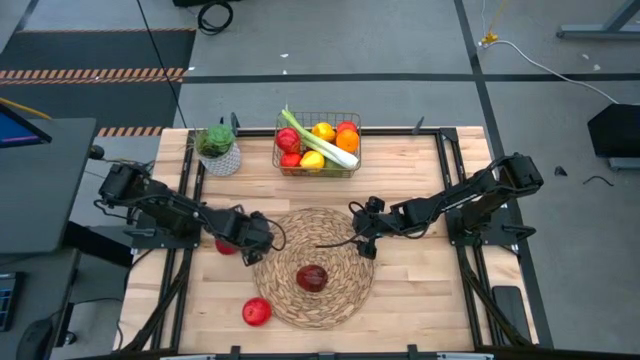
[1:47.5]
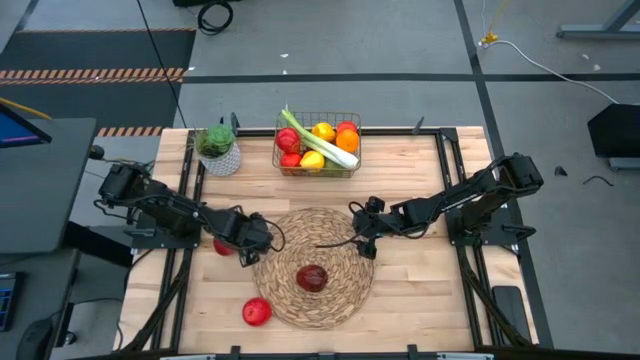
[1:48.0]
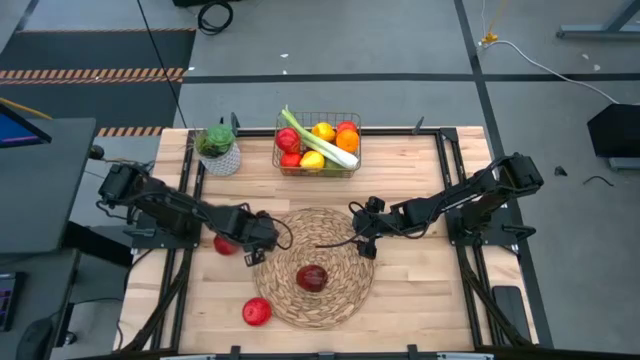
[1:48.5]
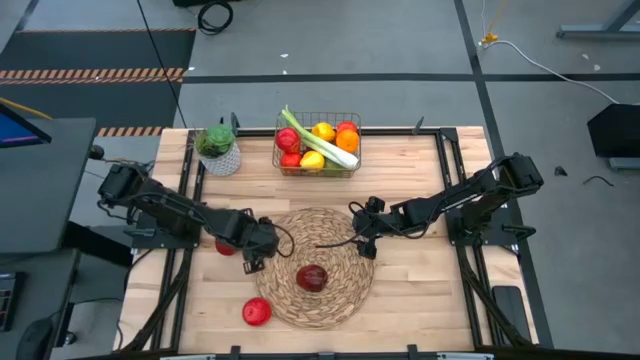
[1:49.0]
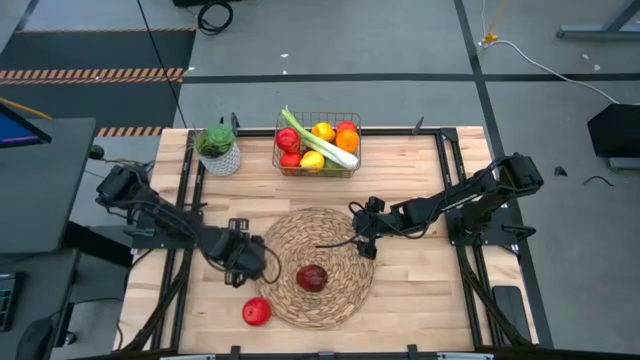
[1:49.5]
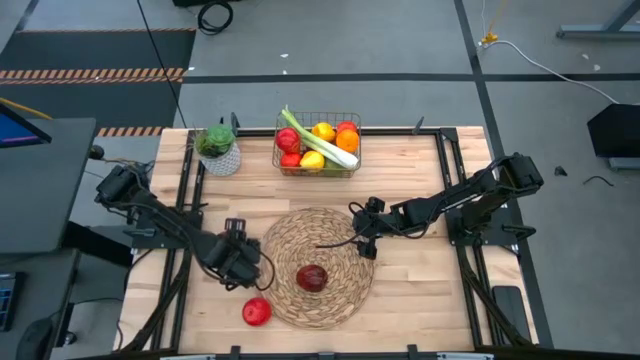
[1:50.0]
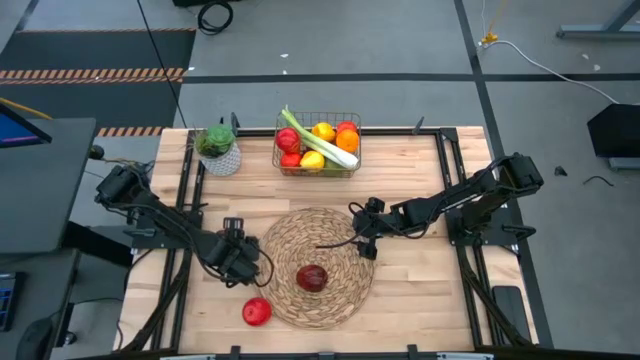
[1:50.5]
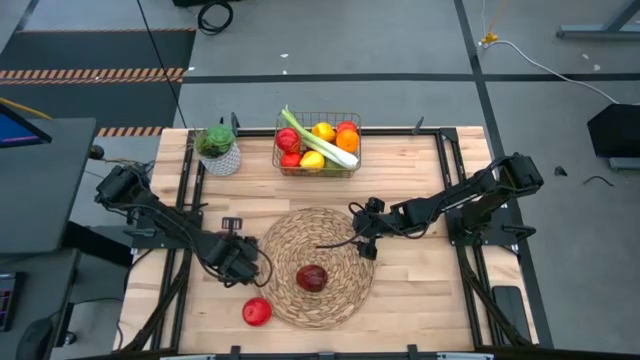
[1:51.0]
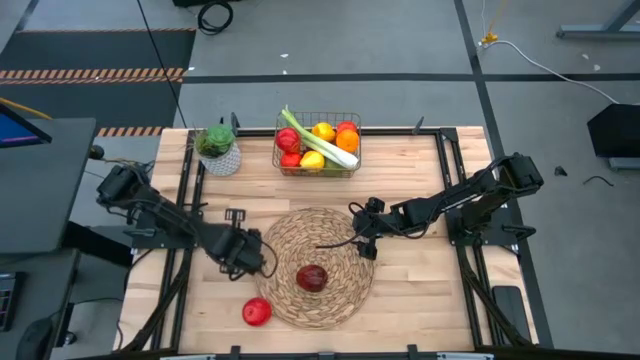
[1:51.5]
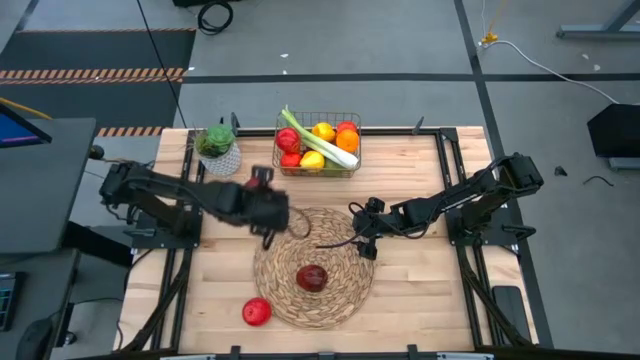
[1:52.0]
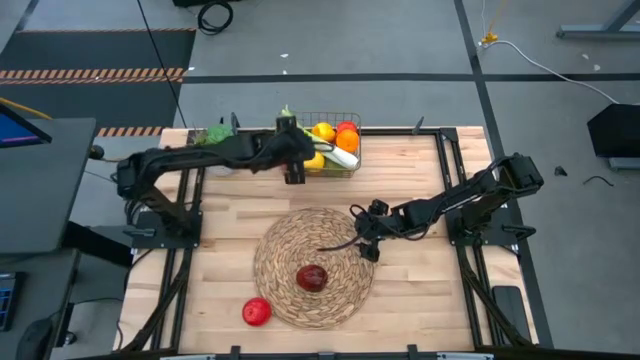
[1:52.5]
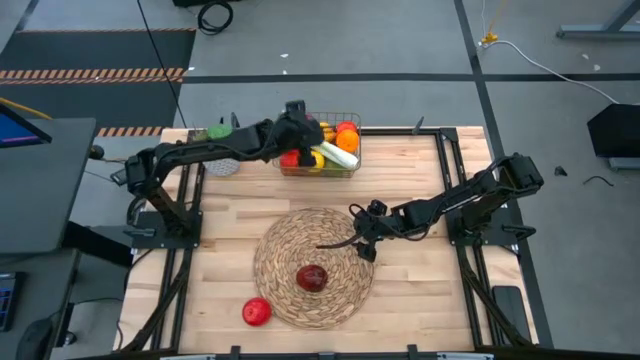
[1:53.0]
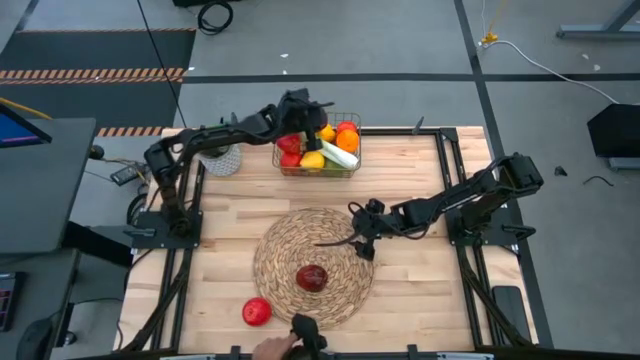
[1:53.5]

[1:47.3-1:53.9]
Task: Build produce basket
Put the pomegranate into the wire basket

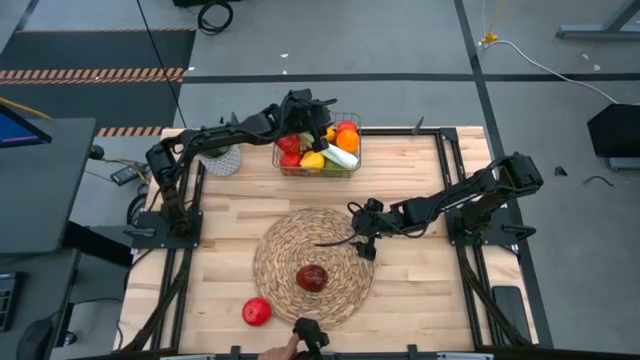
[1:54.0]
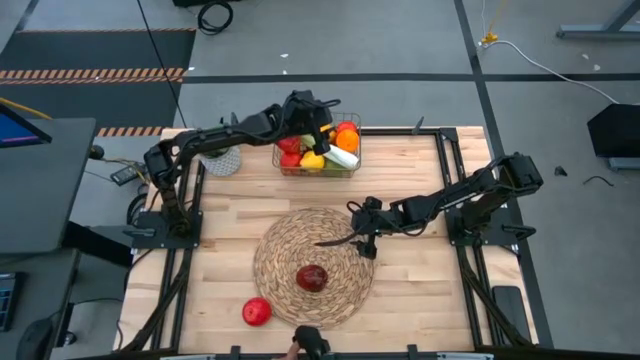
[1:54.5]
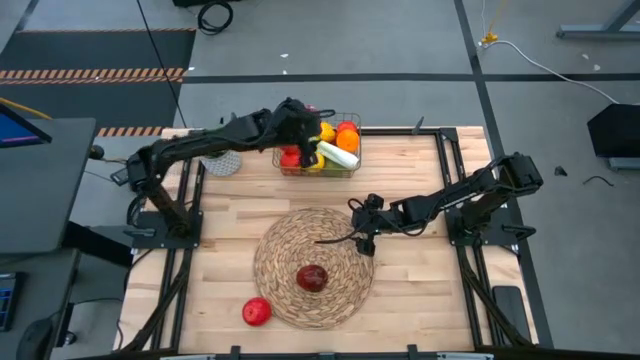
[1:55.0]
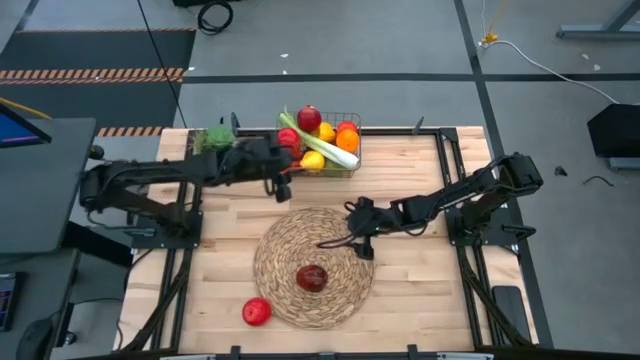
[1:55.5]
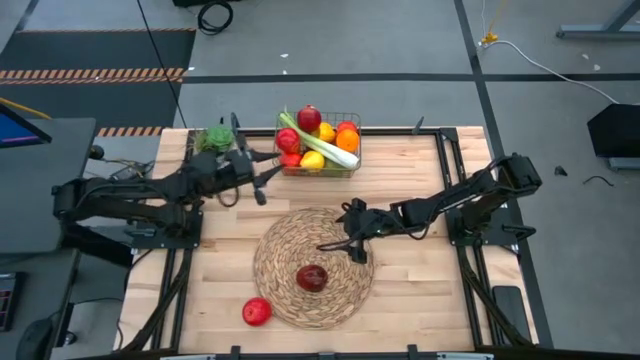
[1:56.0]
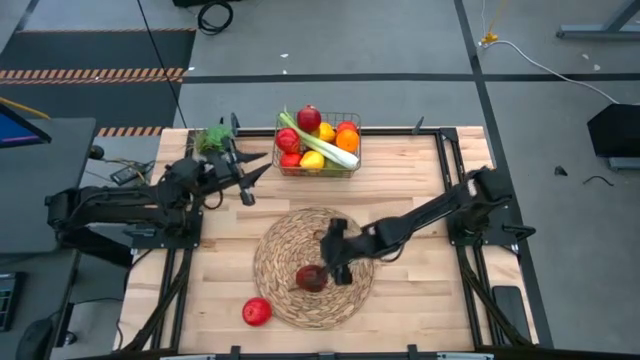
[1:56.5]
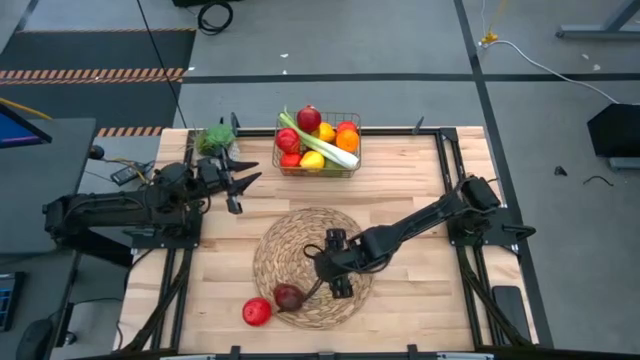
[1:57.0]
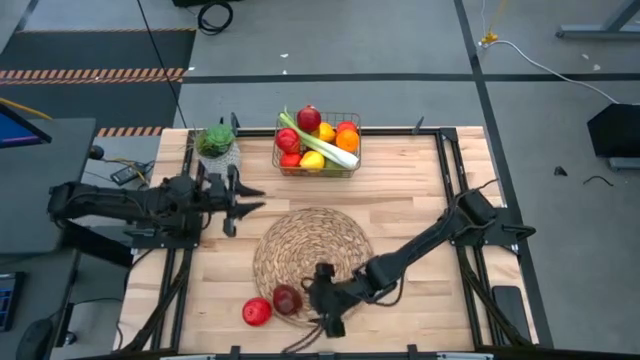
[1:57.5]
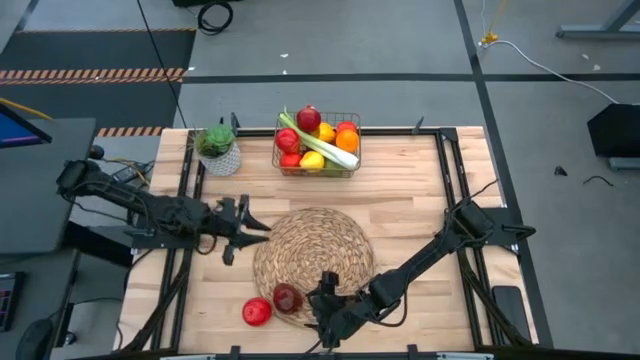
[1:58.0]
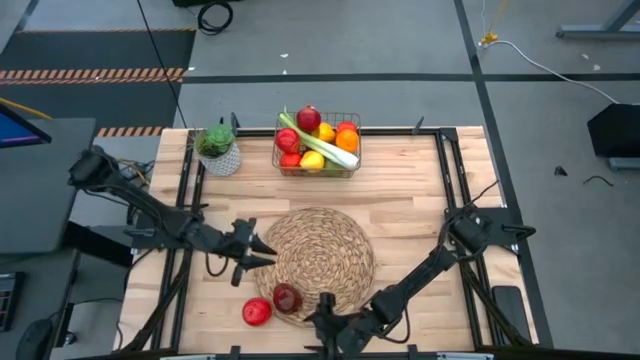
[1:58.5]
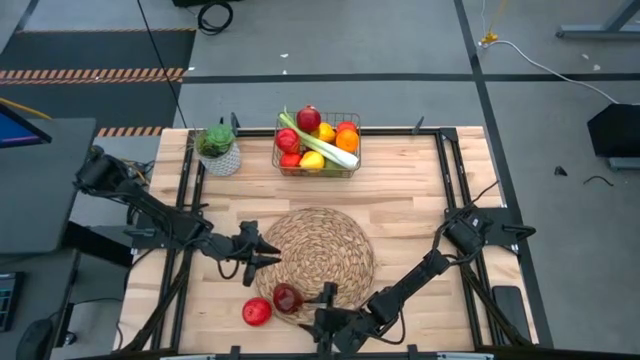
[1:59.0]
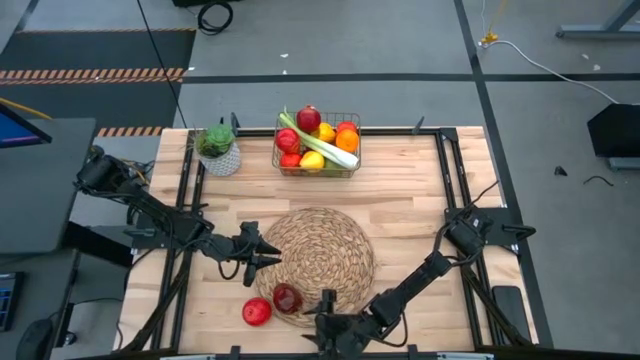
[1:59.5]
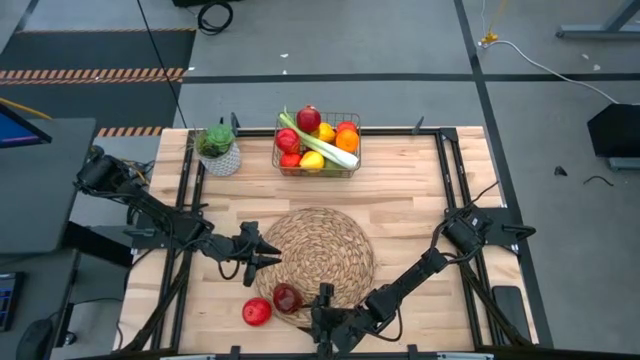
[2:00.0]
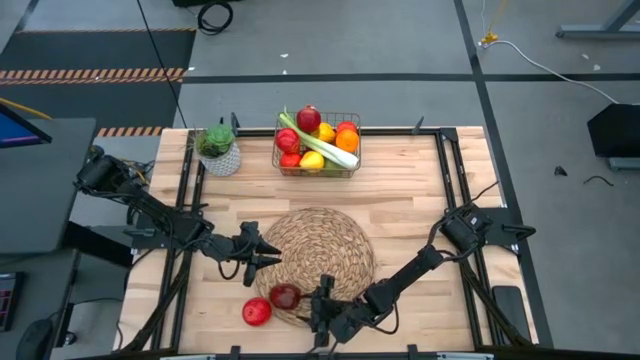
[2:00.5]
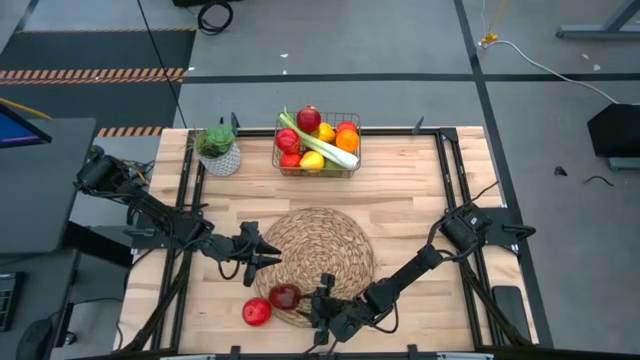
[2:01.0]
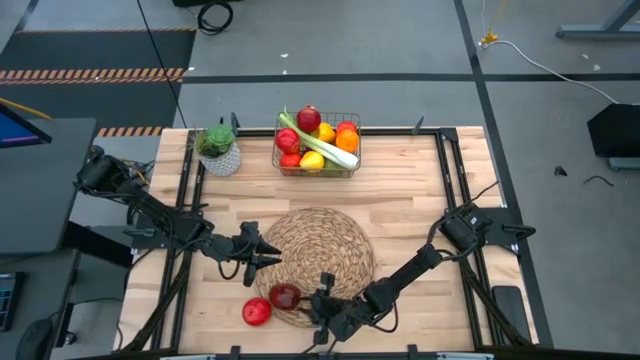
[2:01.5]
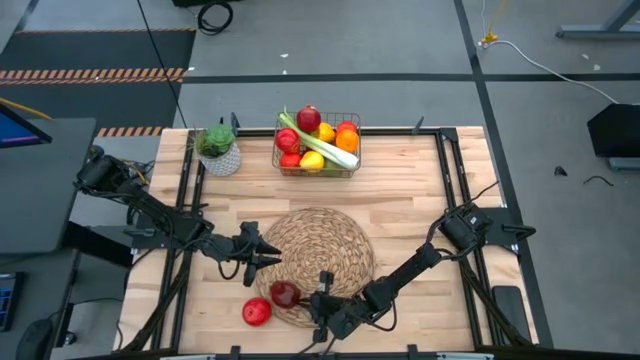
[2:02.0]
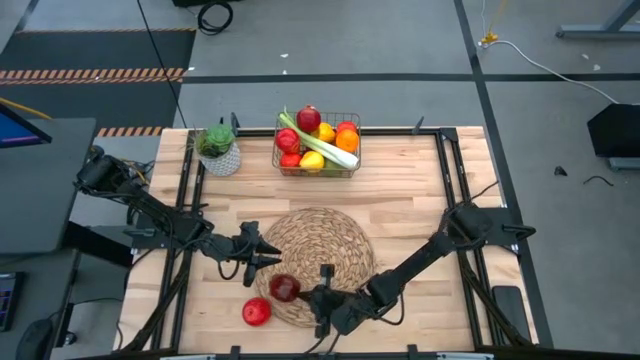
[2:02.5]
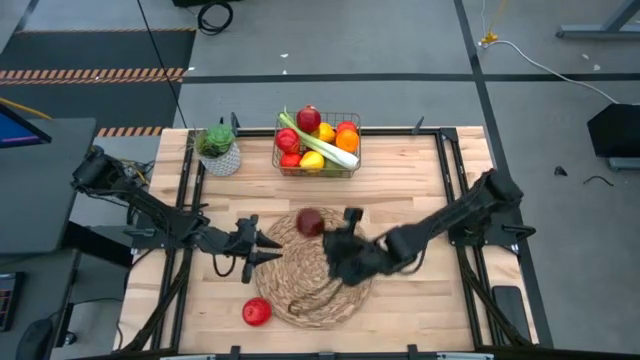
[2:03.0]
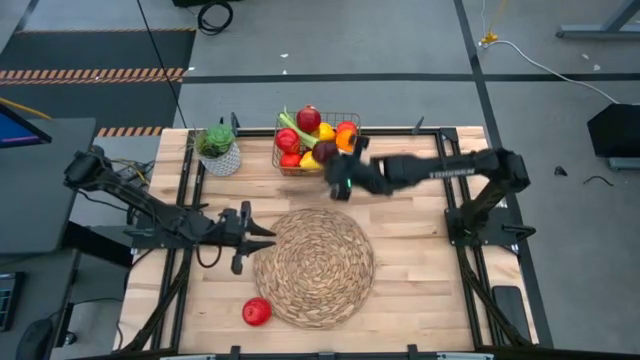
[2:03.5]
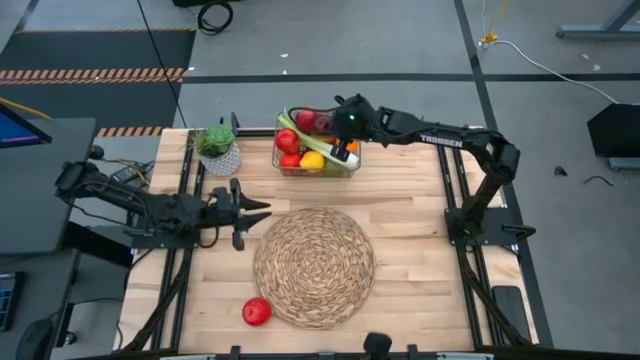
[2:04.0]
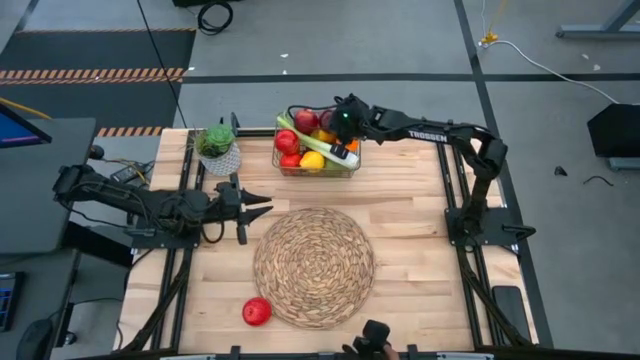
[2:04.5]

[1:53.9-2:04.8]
Put the apple into the wire basket

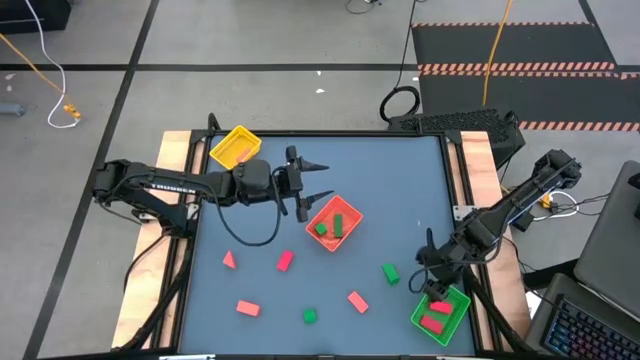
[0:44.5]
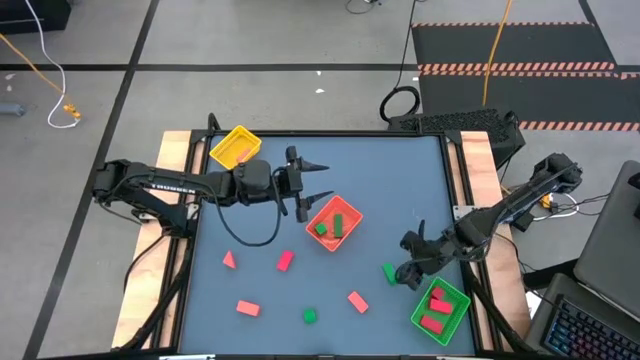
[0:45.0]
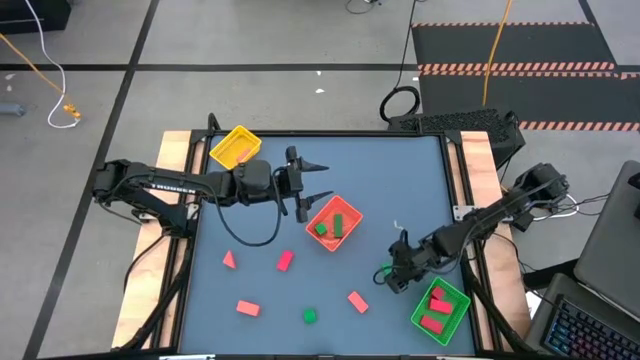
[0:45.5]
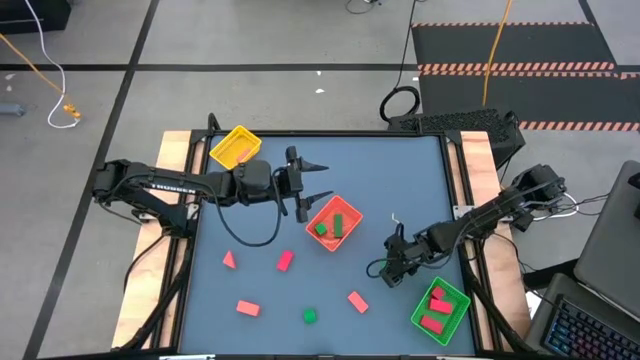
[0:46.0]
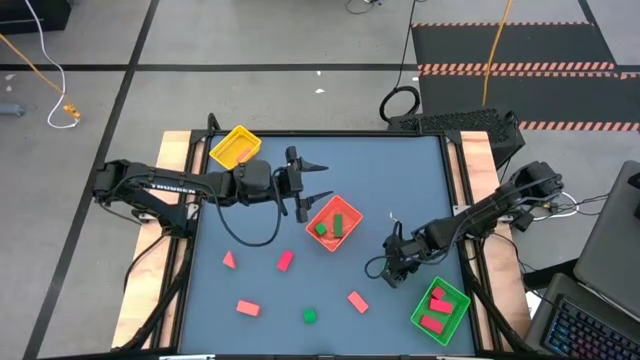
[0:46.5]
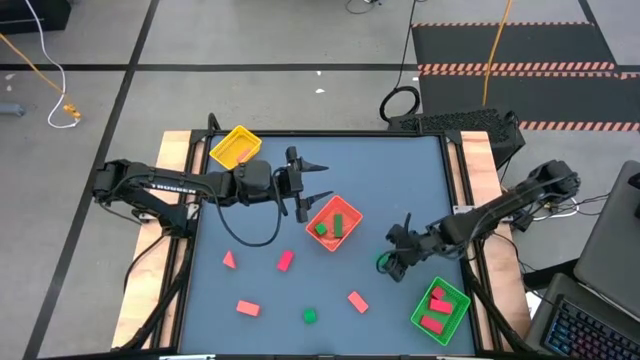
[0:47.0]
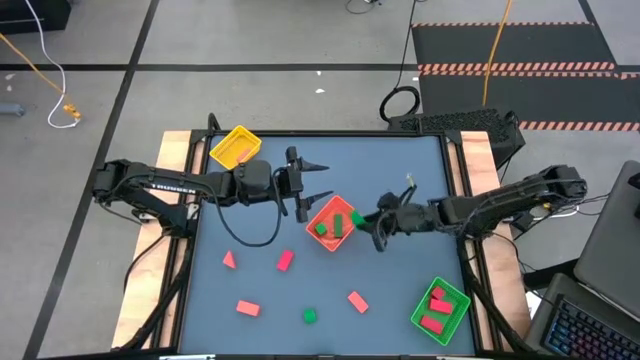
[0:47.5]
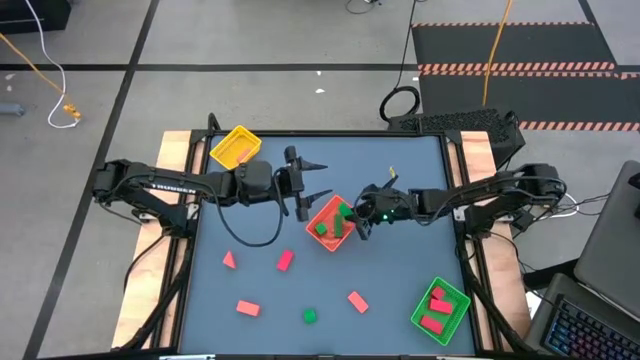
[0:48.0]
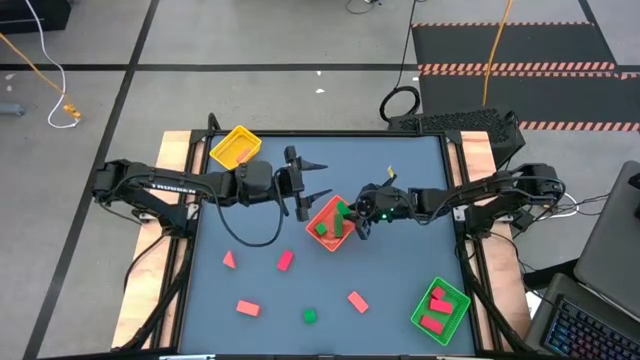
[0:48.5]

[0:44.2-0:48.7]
Task: Sort & place blocks by color
Put the green block into the orange bin
